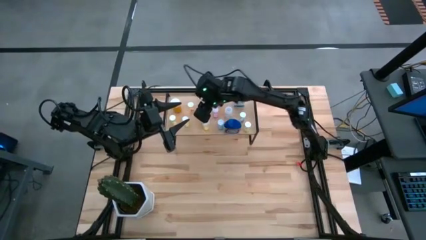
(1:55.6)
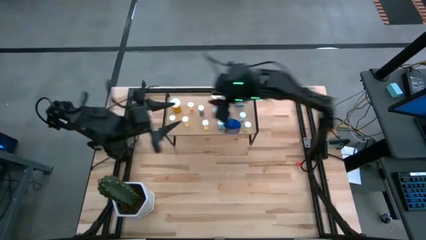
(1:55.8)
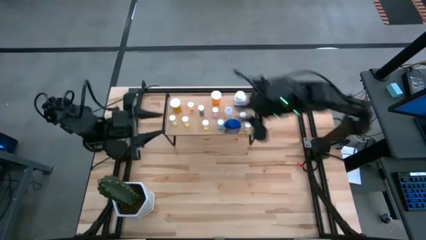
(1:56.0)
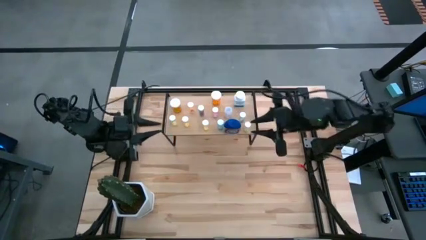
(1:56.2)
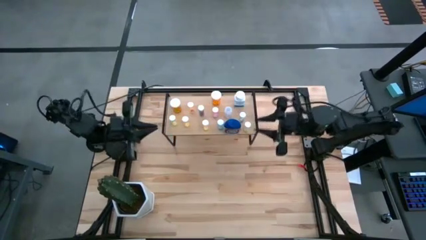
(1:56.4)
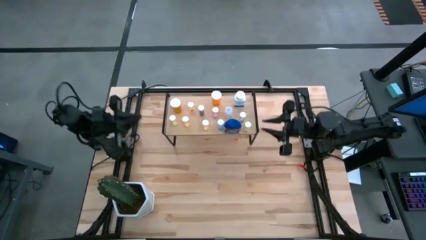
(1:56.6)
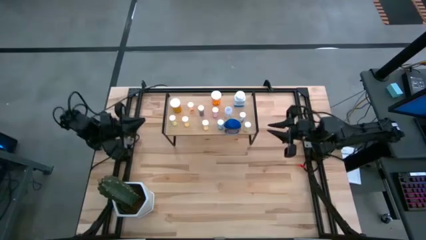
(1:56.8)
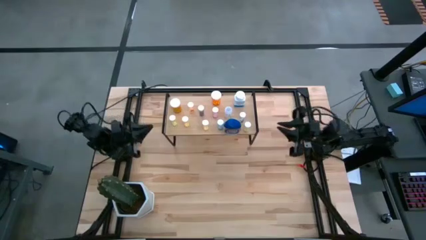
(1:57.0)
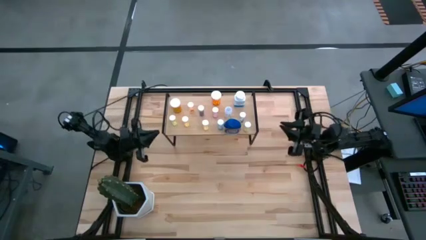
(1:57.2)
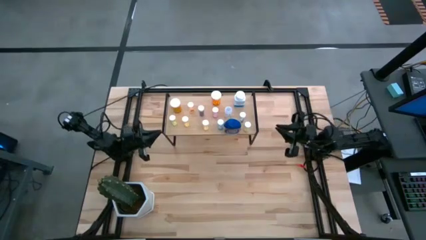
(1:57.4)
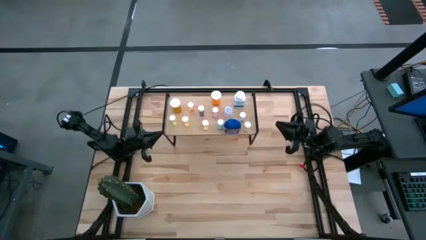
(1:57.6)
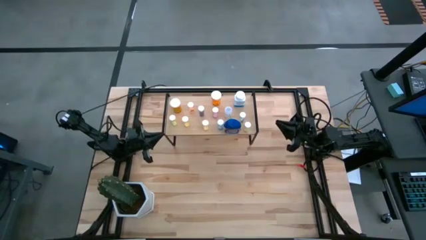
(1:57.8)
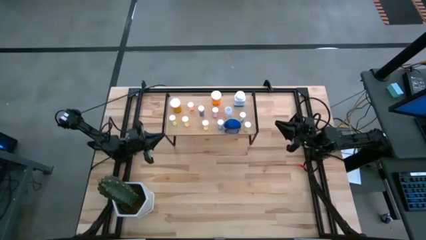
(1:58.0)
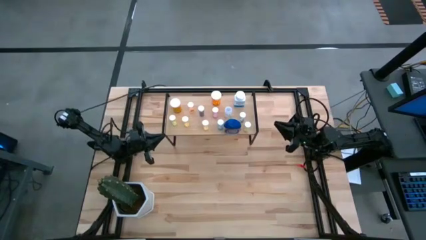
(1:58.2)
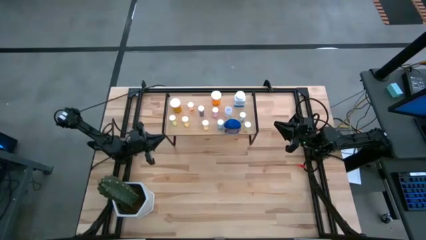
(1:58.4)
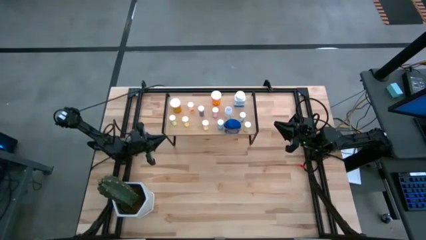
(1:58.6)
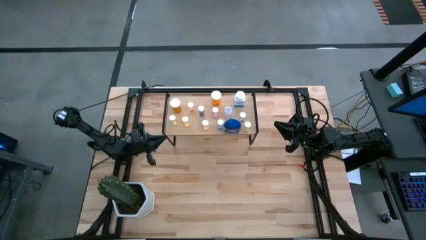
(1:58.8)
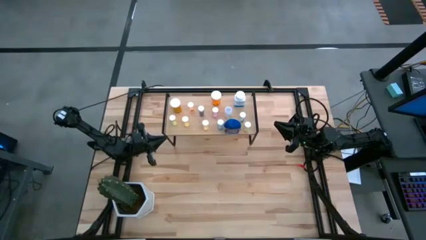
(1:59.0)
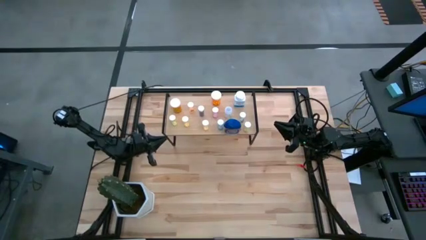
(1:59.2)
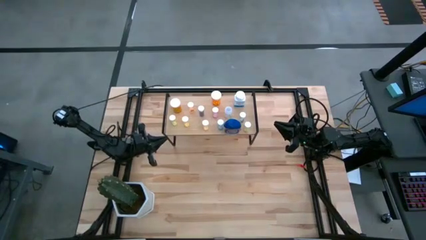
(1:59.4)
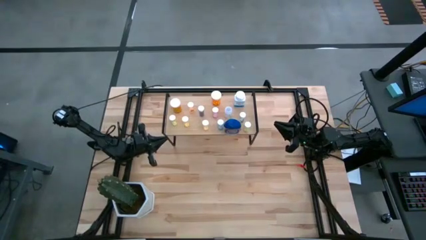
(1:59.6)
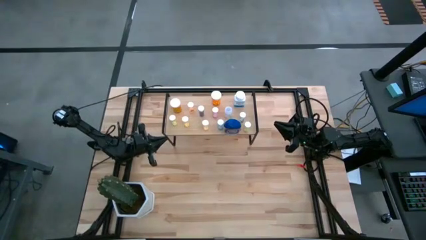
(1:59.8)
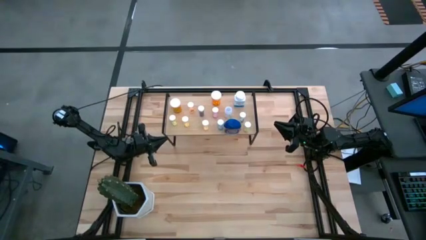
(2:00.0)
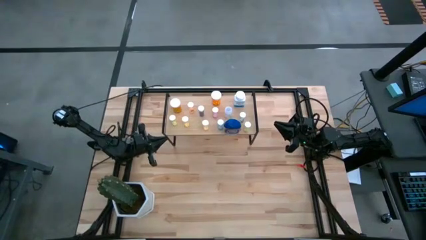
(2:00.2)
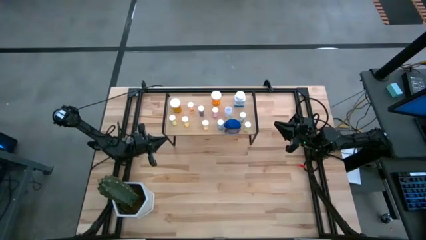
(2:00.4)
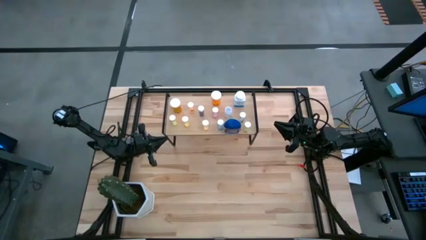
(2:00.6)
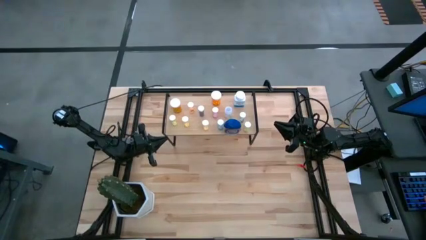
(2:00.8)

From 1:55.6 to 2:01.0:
Task: Pick and place medicine bottles onto shelf by color
Return to Home Position

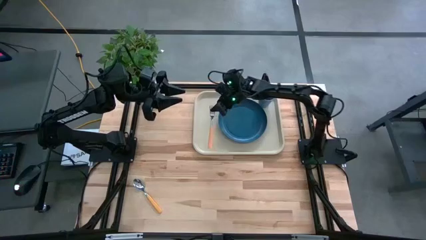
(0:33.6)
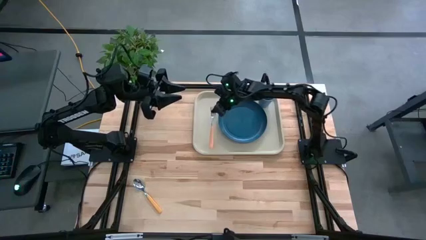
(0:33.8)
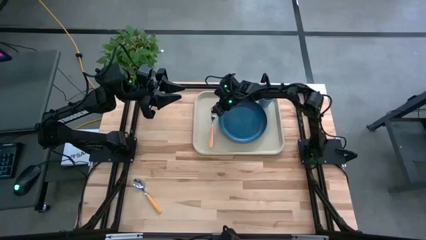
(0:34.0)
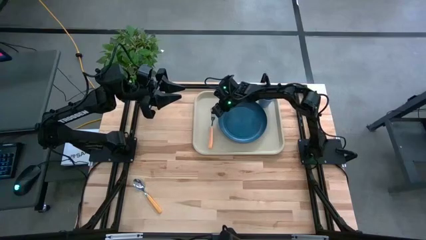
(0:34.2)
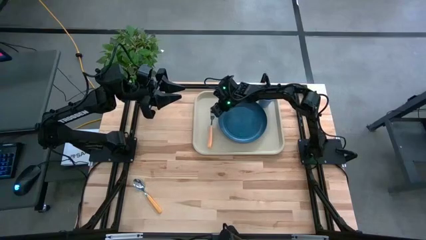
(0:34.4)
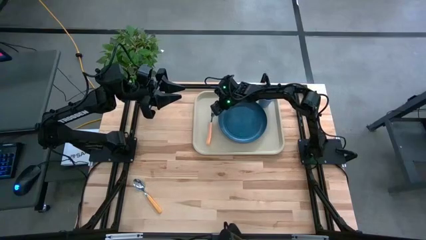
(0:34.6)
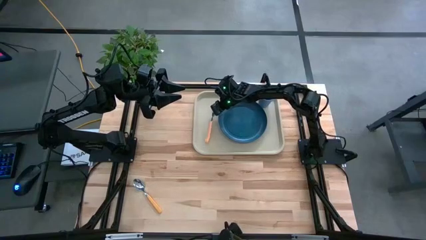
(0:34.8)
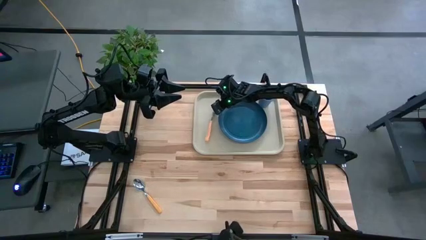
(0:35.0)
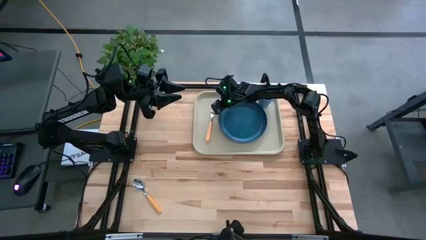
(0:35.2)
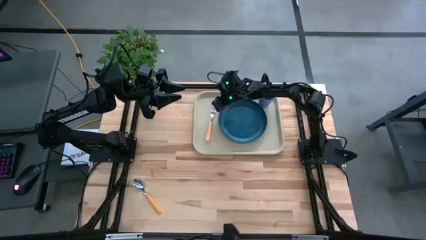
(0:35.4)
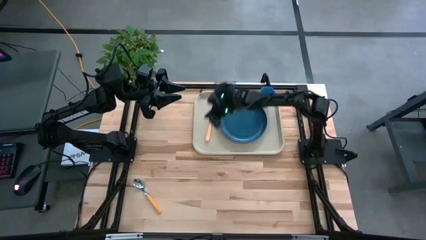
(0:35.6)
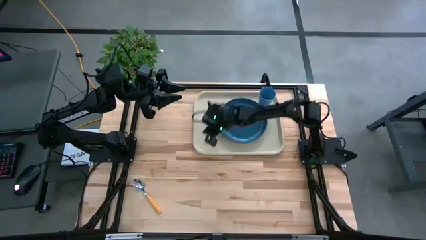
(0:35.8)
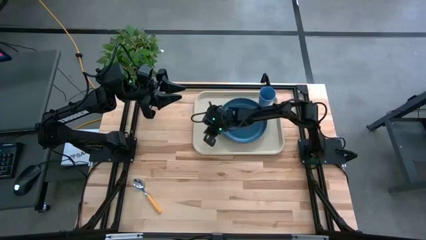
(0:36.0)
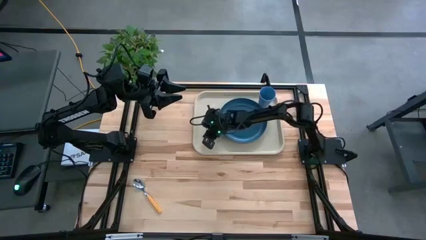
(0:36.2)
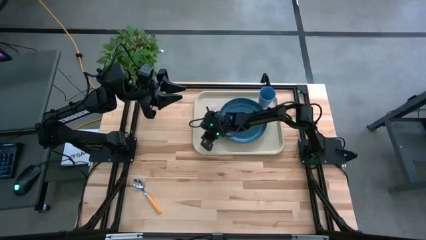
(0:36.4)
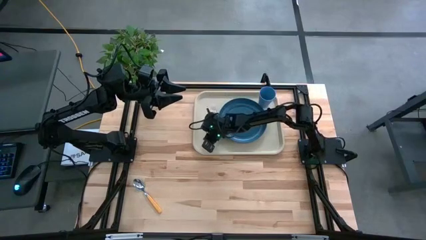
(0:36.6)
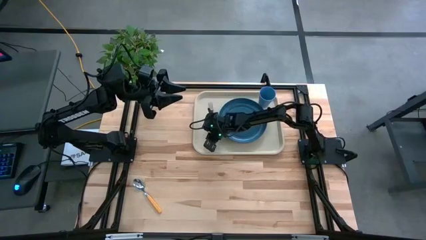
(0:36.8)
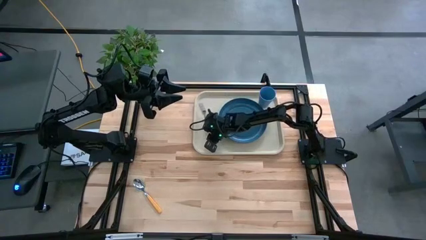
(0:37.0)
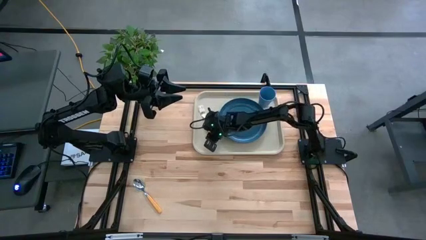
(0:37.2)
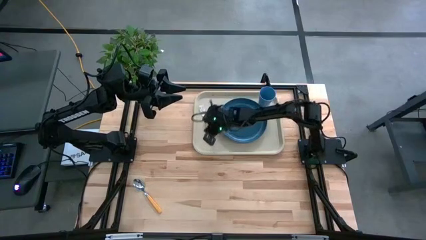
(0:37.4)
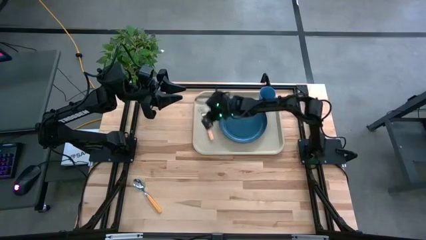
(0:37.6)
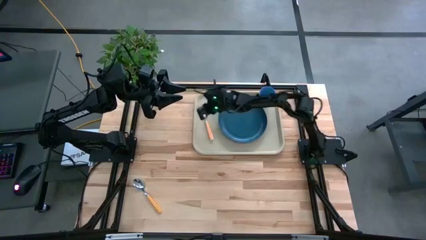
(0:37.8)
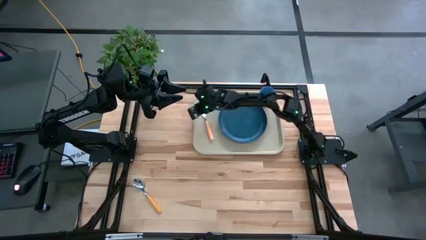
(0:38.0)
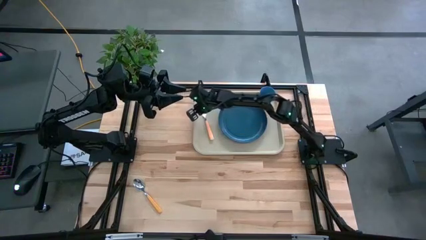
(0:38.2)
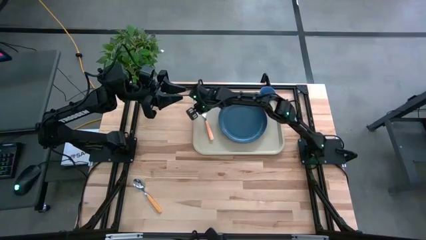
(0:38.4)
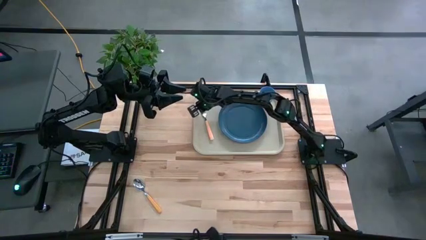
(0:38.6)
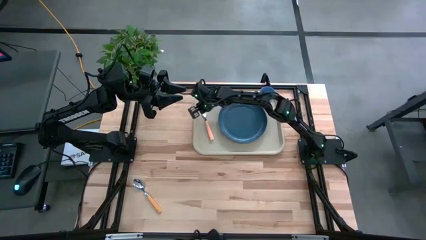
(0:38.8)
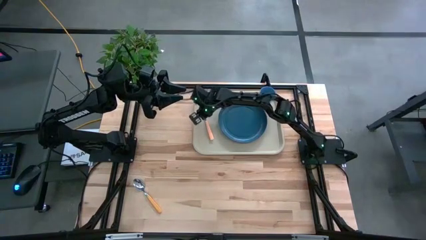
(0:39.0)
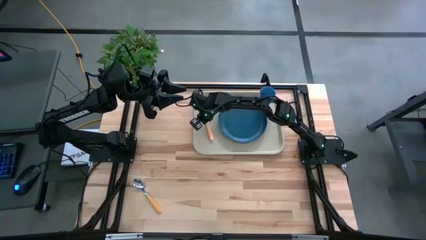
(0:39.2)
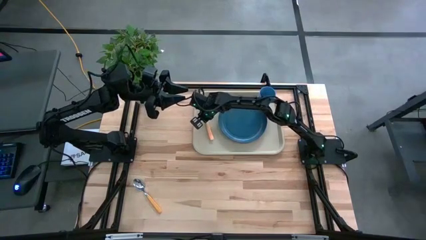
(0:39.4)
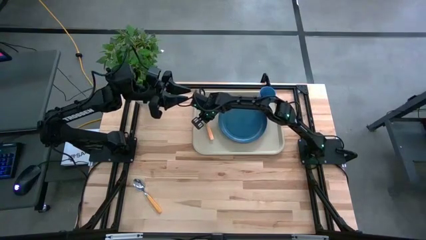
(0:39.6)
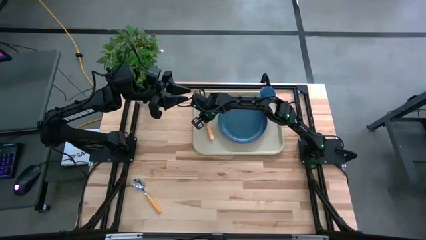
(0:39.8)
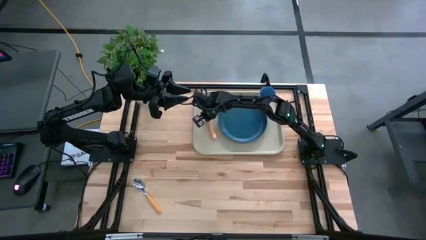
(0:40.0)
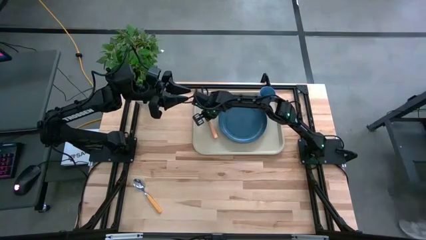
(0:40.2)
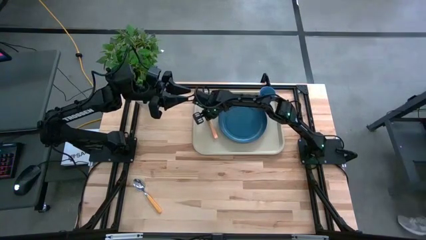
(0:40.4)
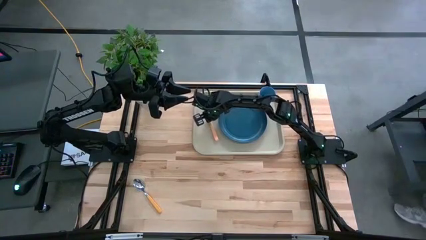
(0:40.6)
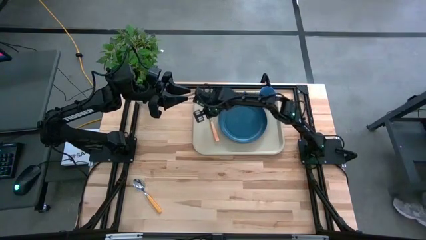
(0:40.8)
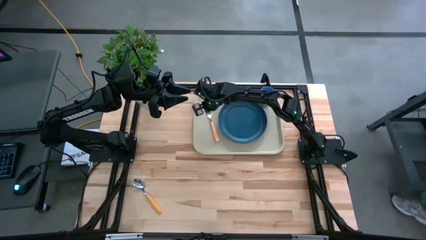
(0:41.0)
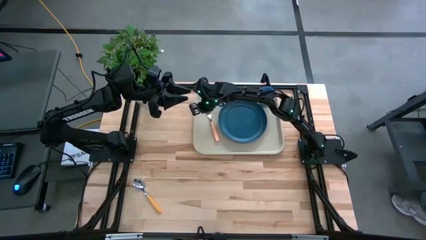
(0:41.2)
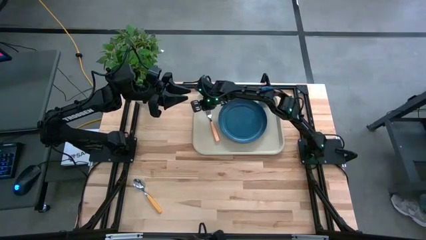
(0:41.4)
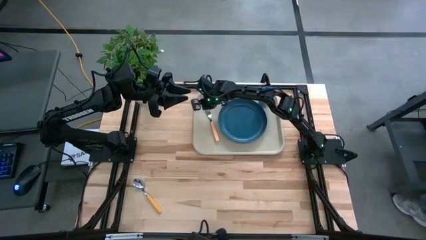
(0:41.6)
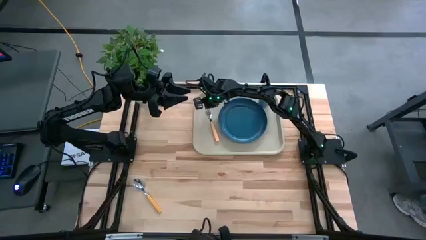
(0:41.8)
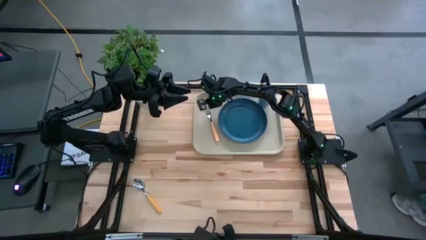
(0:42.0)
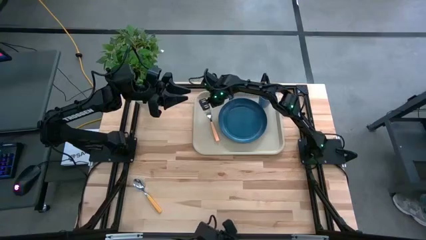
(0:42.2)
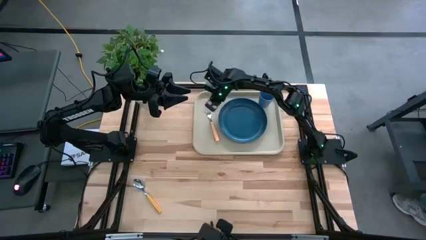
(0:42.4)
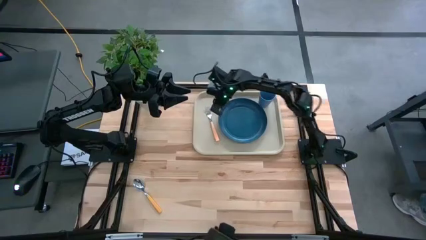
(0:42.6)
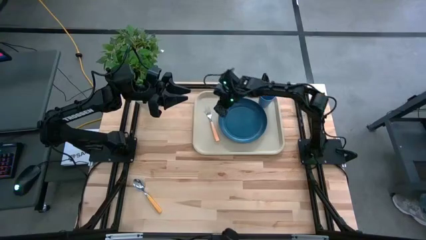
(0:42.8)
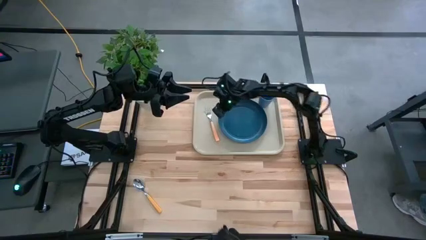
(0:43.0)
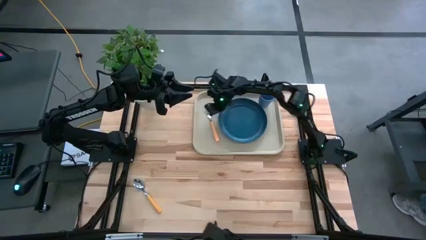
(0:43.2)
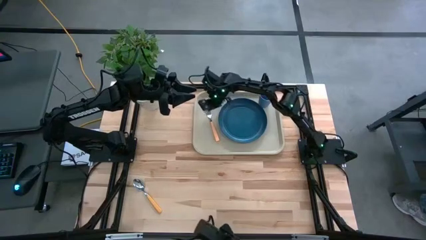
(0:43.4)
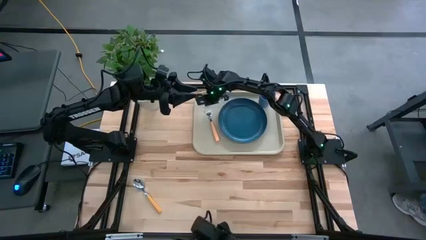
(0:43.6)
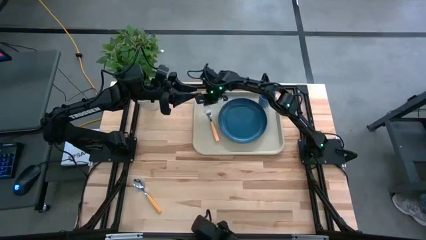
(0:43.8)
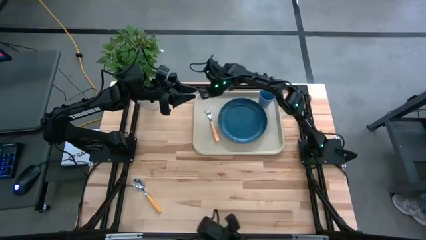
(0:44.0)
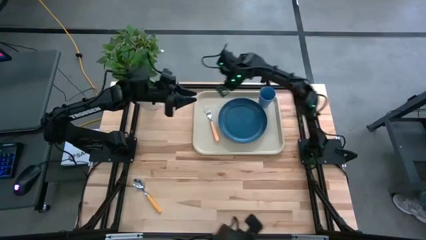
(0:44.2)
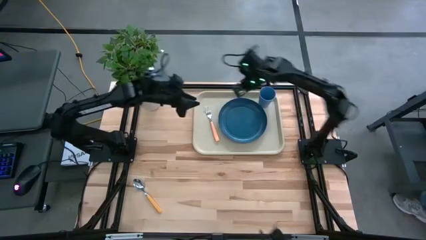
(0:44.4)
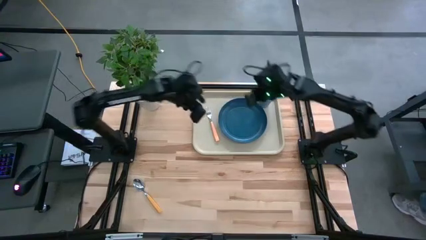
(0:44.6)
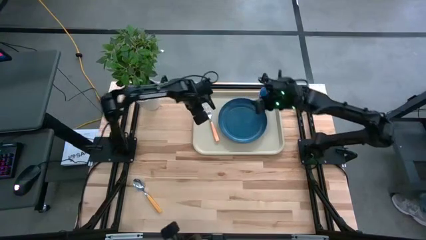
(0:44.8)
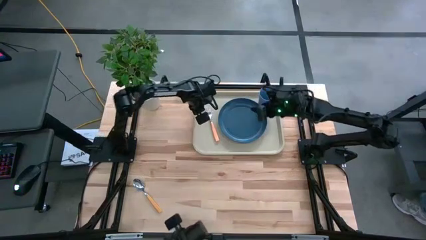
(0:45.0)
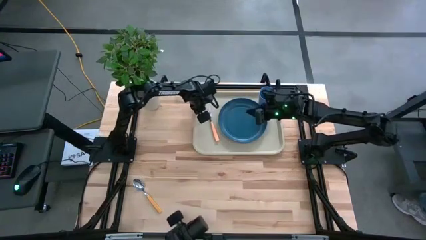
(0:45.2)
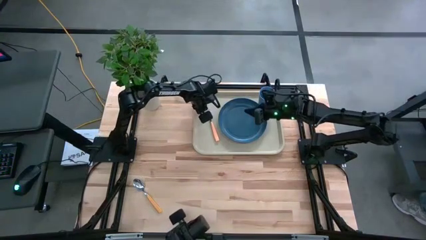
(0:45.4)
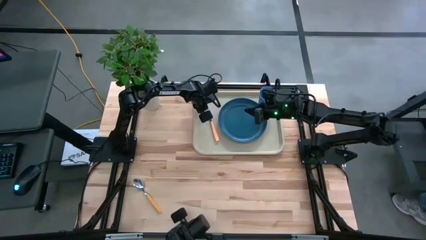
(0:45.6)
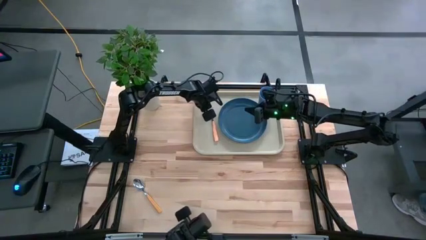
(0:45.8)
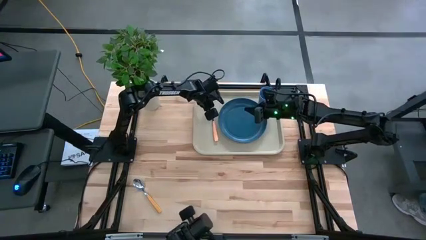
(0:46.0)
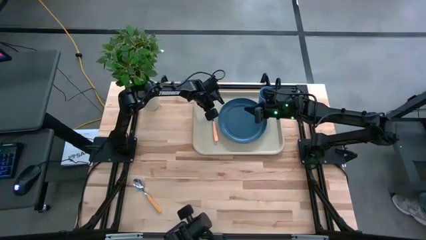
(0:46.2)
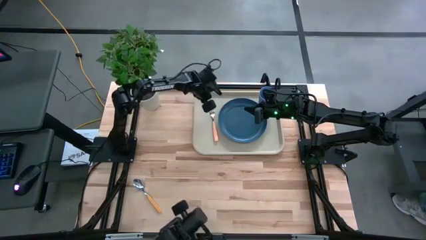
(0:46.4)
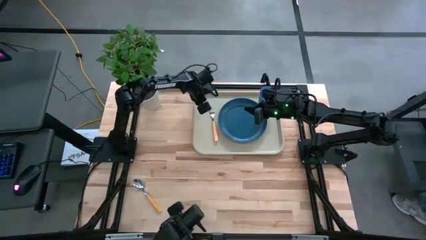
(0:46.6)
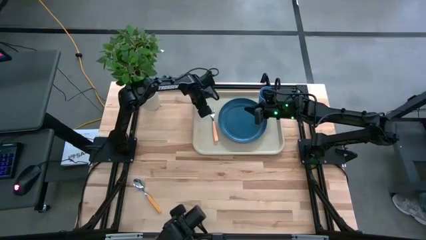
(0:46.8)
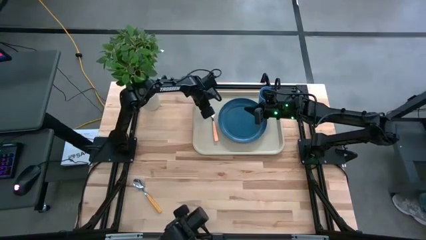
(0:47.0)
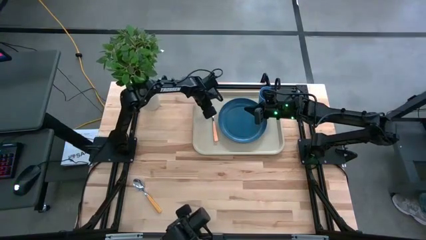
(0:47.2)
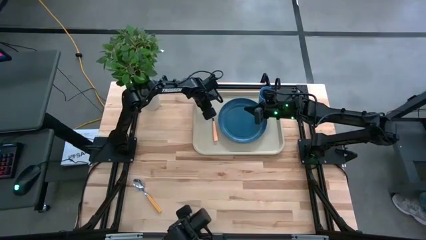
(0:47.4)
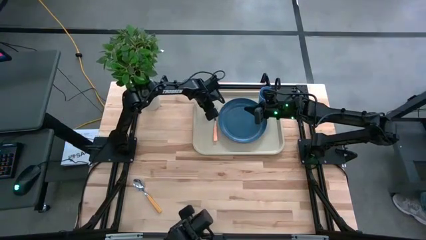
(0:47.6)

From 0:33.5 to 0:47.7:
Task: Pick and place plate/cup/fork/spoon on tray
Put the brown fork on the gray serving tray to the left of the blue plate
